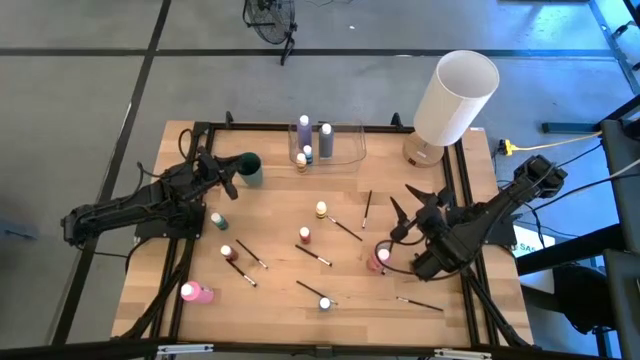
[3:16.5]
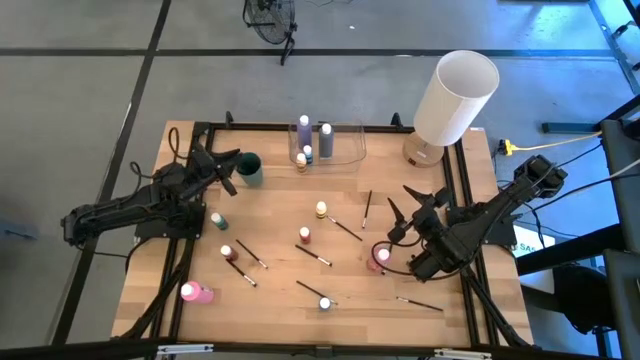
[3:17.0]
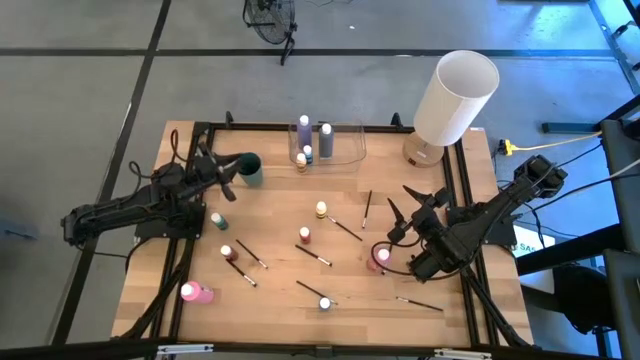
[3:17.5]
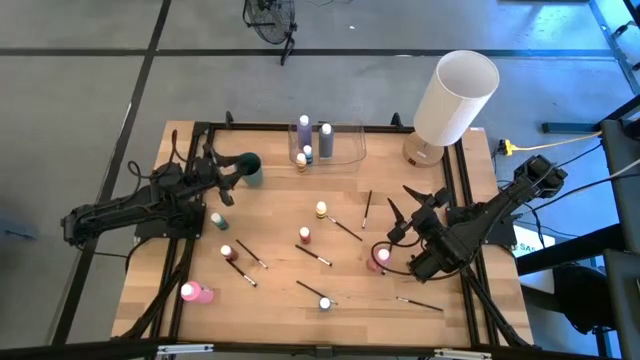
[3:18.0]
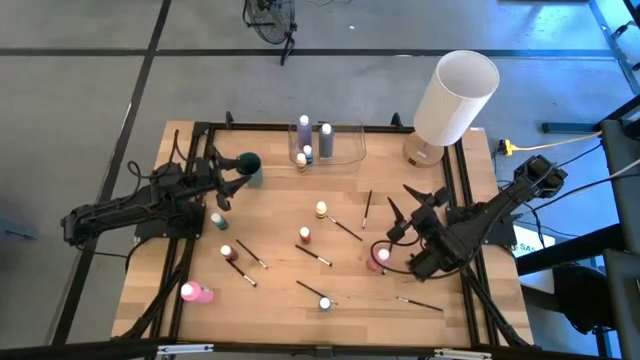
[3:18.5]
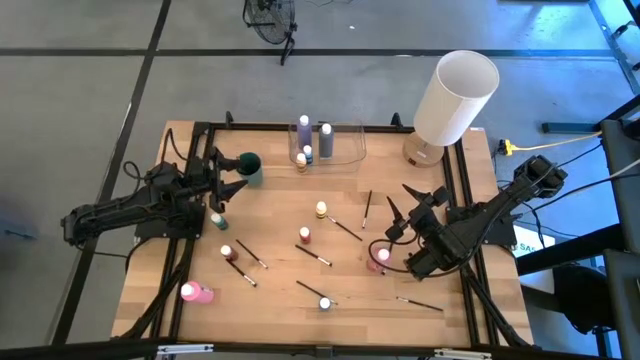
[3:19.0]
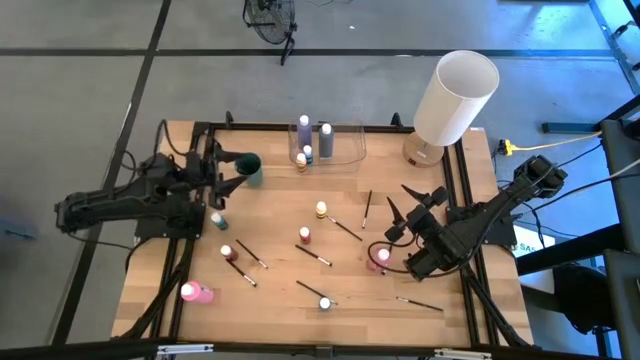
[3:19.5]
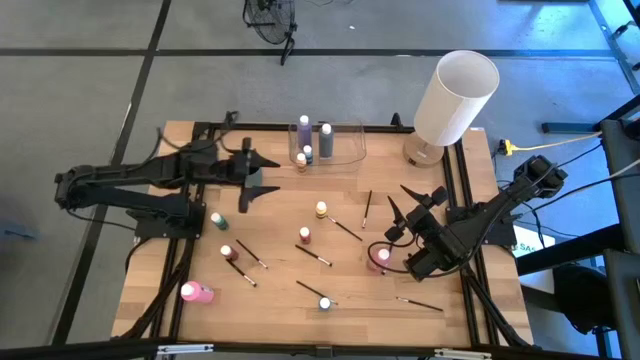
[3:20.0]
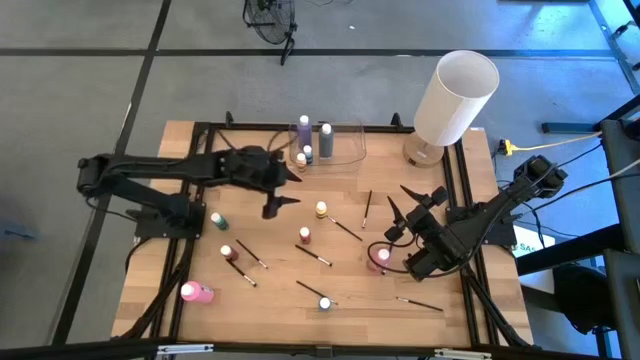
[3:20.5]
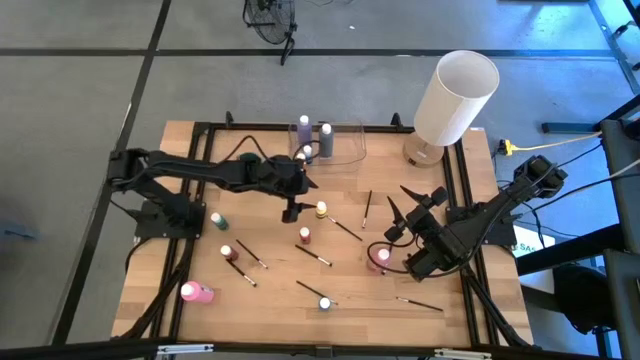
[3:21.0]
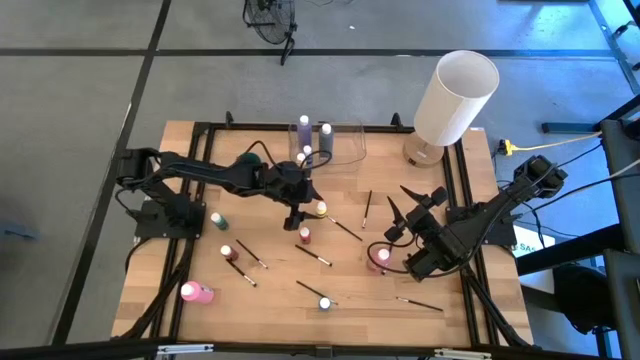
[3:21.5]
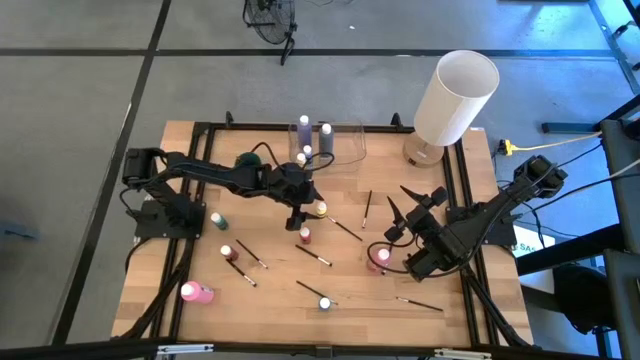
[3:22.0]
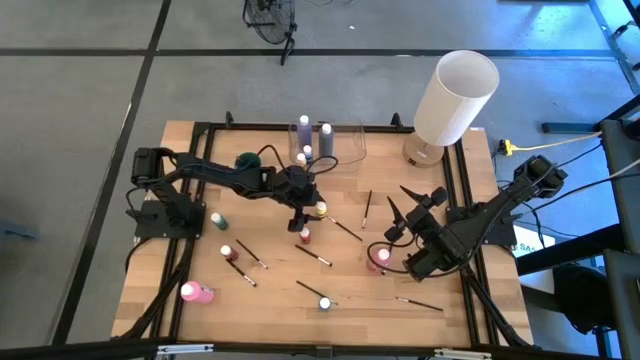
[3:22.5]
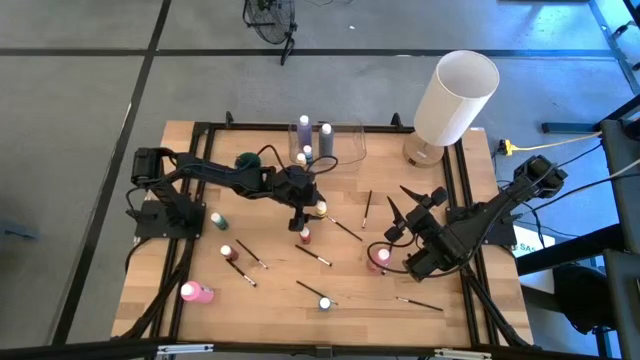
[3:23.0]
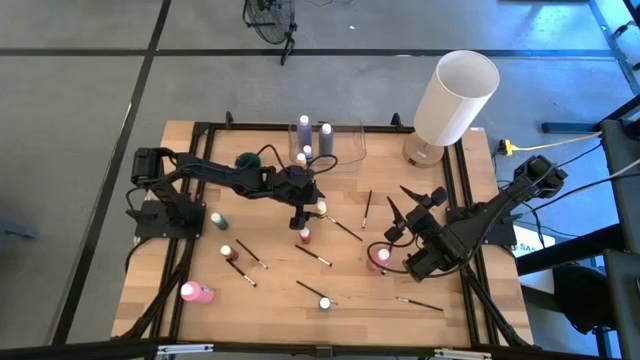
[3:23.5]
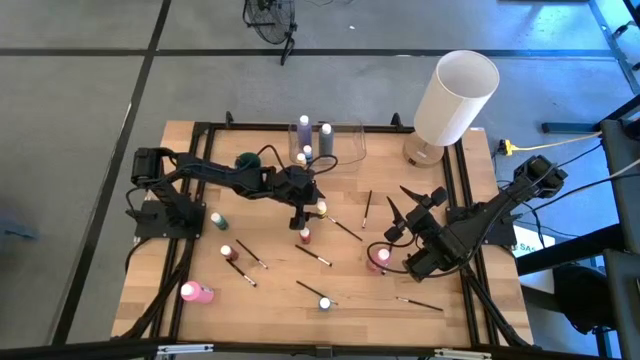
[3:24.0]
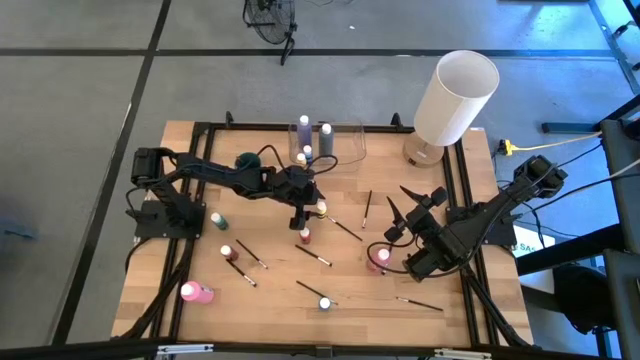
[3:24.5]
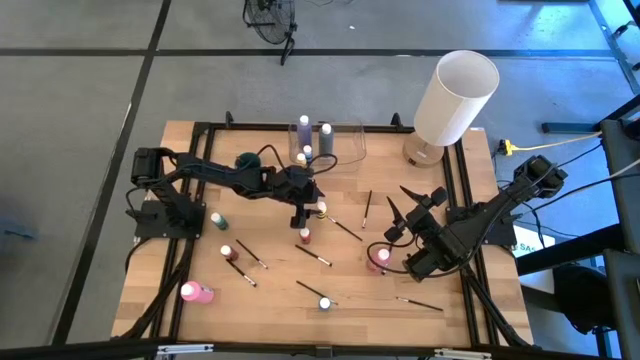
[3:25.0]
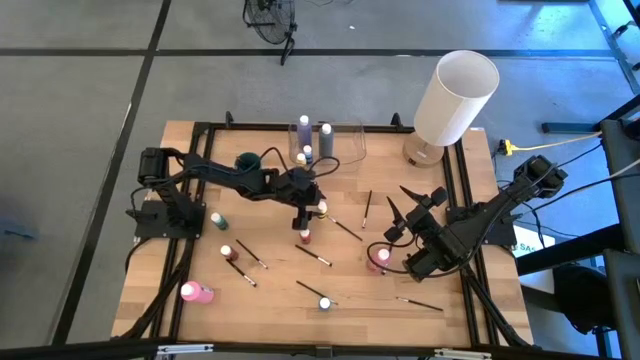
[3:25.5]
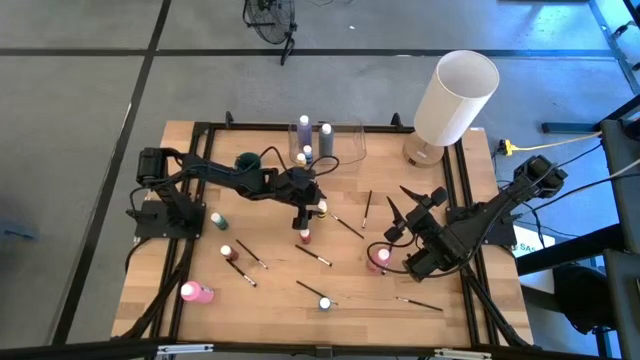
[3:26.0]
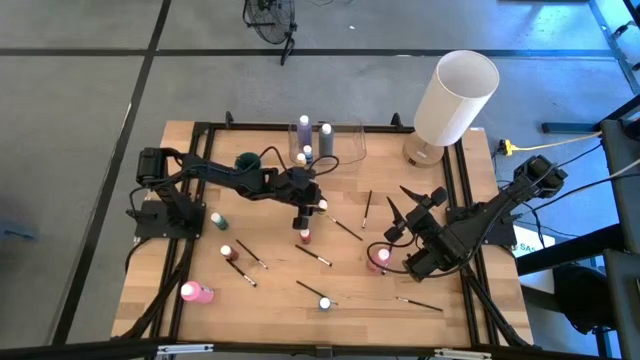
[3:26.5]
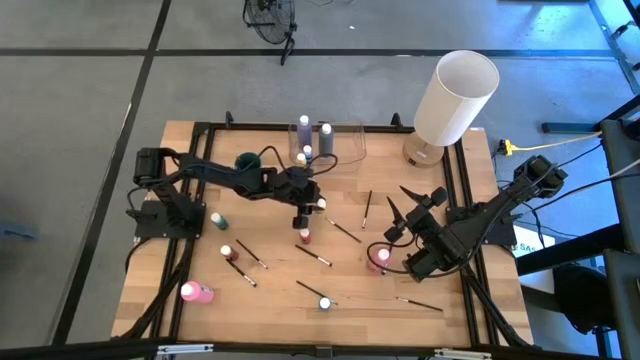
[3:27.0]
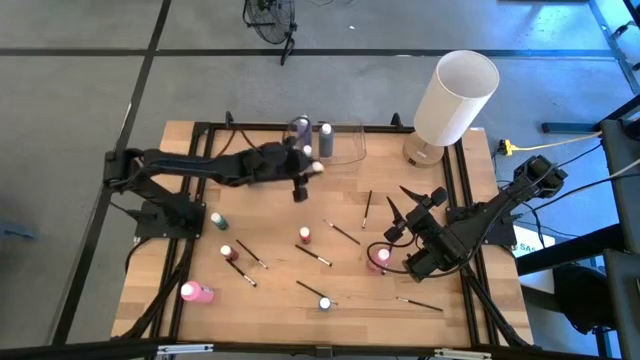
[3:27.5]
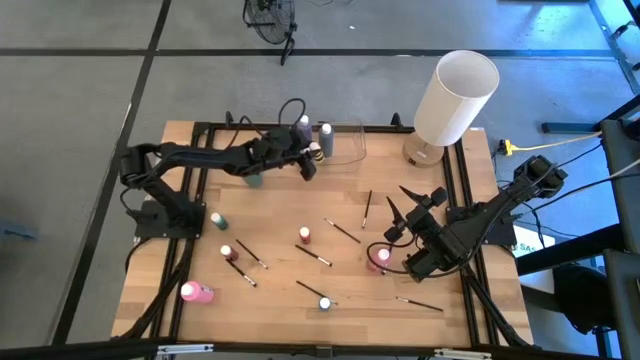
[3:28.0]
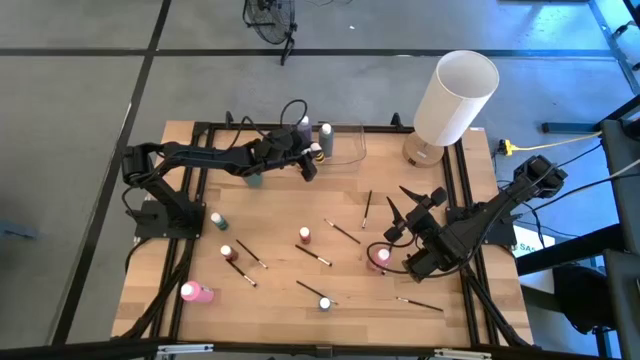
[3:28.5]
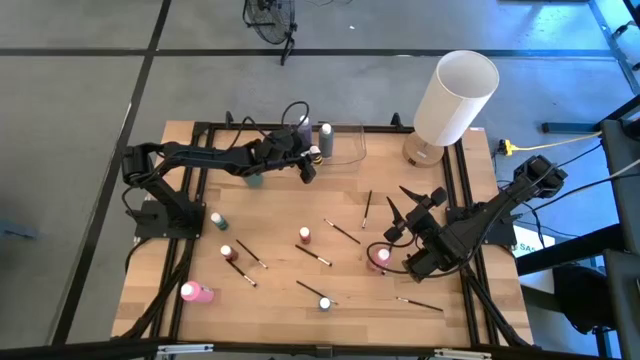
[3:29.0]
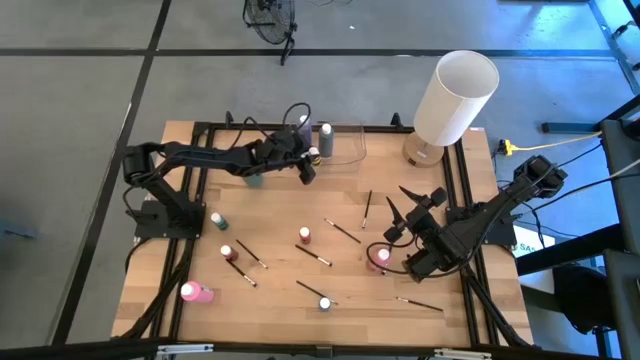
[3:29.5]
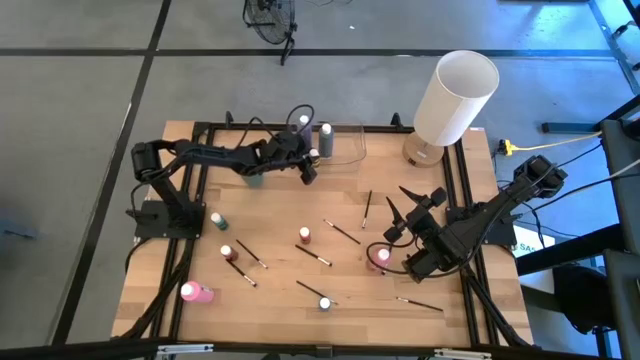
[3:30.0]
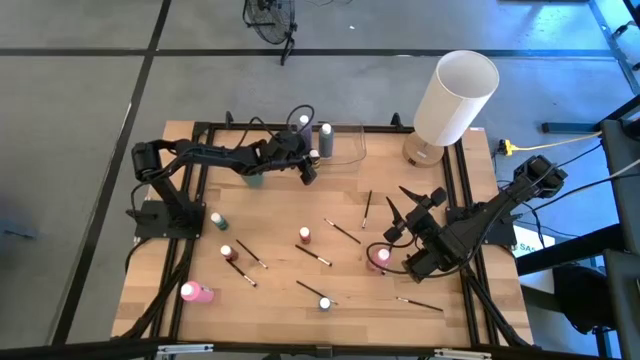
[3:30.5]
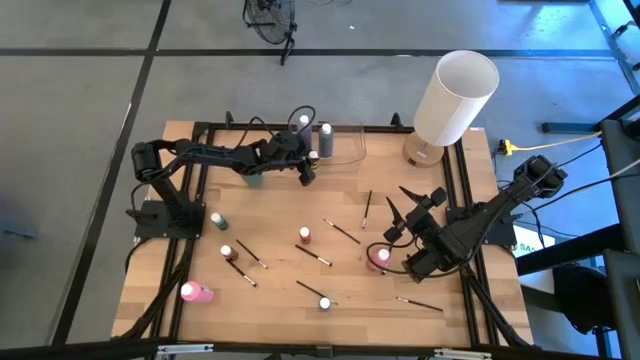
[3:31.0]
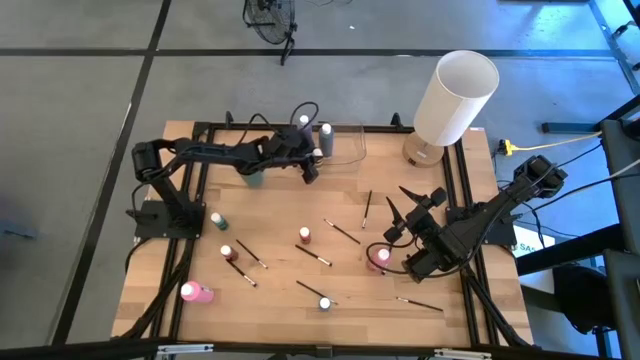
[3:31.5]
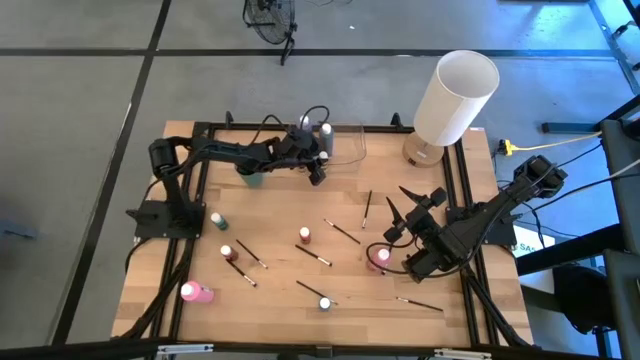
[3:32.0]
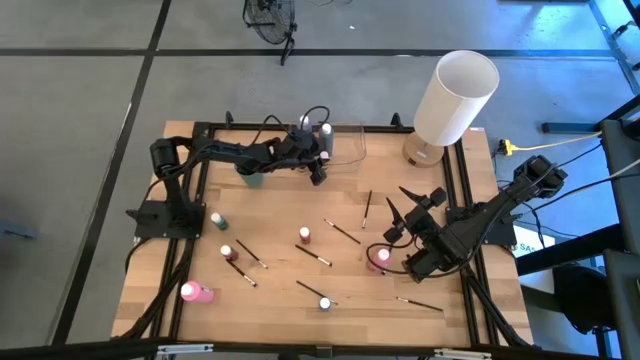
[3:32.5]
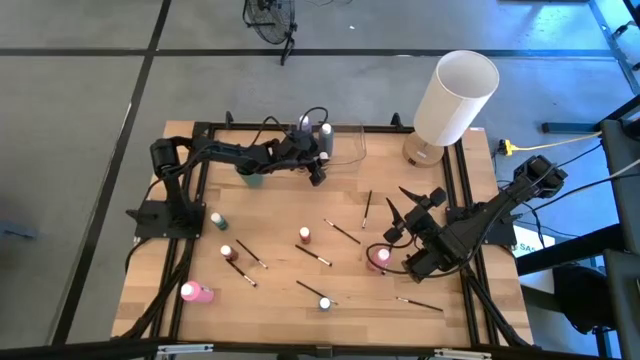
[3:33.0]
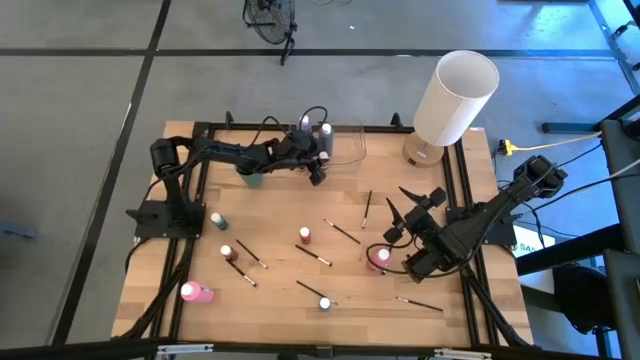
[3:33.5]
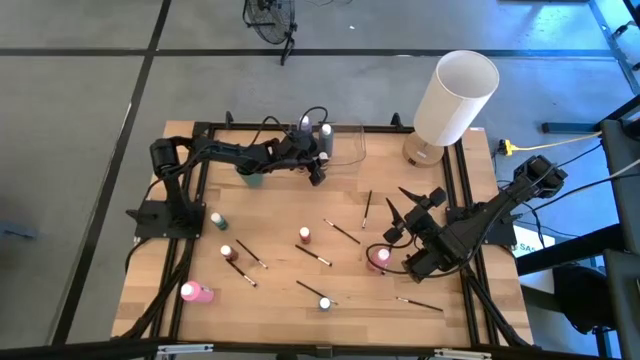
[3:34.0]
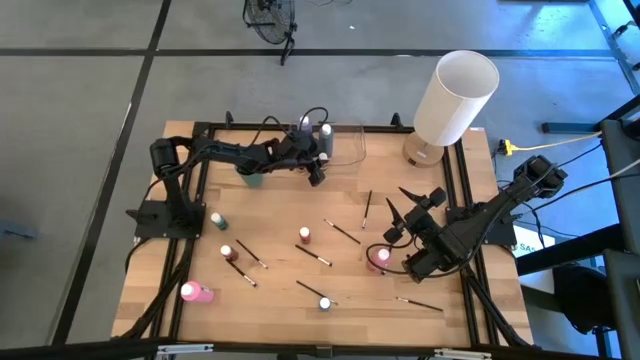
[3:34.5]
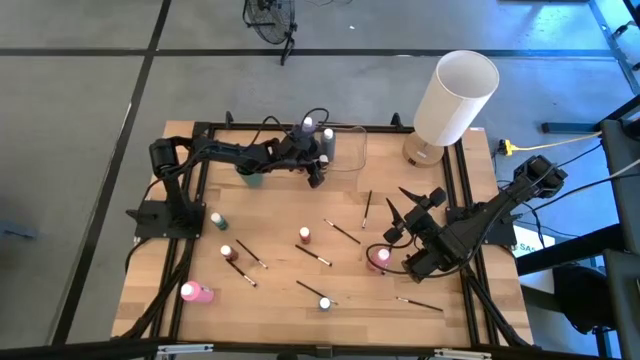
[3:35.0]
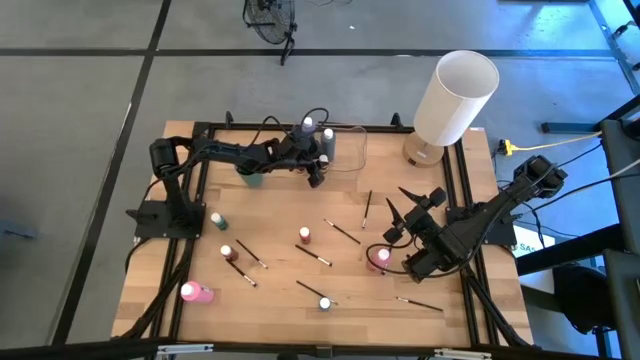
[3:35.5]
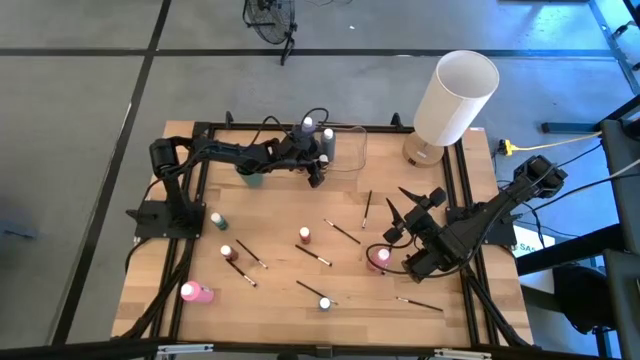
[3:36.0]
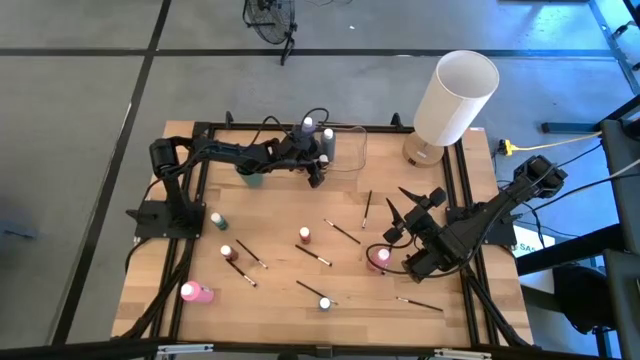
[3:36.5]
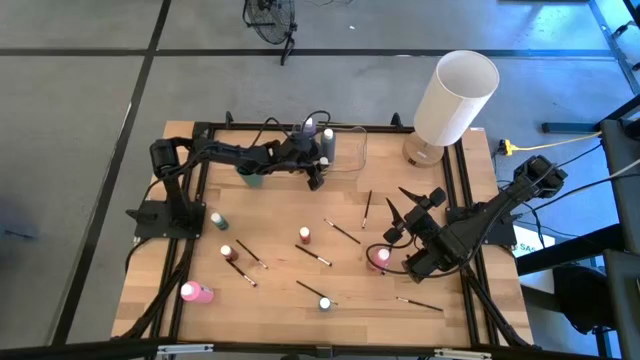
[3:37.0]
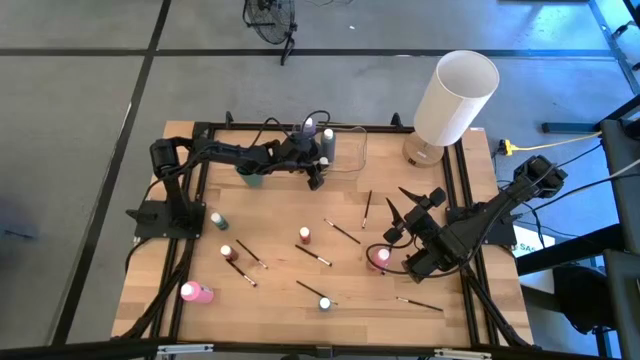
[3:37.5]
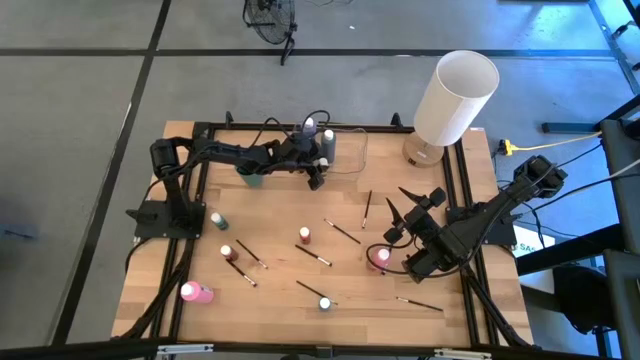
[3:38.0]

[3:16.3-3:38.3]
Task: Pick & Place Paint Supplies
Put the yellow paint bottle into the transparent bin
